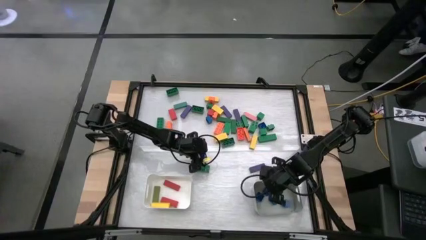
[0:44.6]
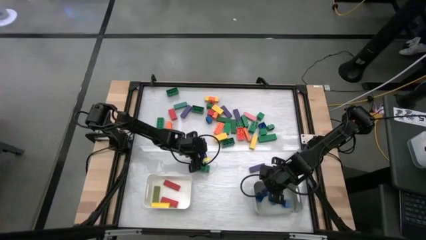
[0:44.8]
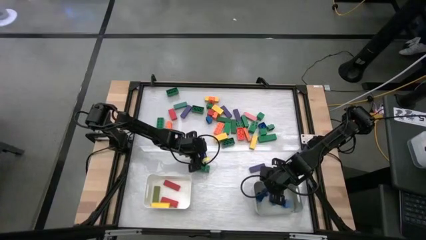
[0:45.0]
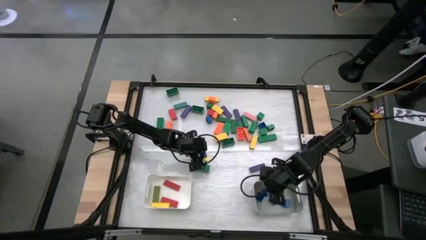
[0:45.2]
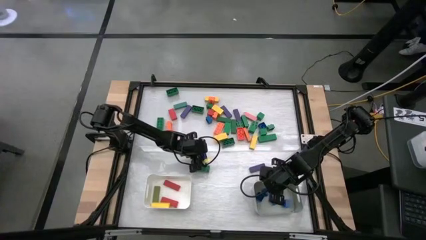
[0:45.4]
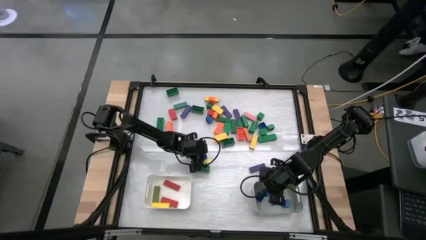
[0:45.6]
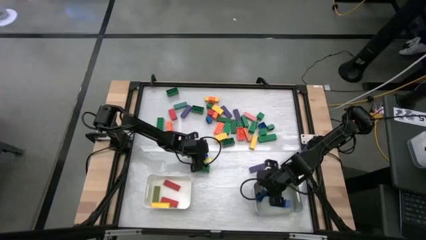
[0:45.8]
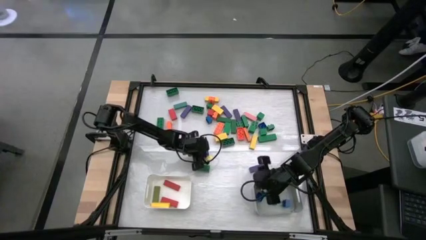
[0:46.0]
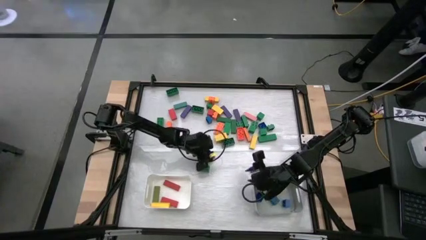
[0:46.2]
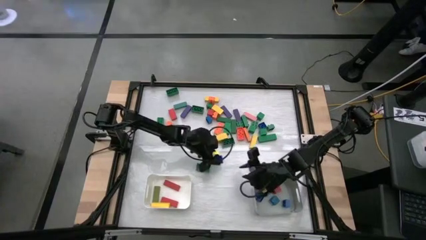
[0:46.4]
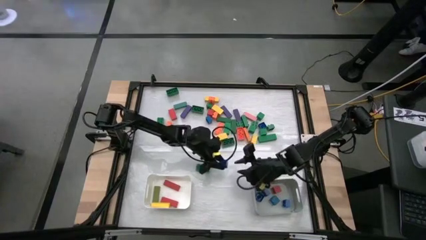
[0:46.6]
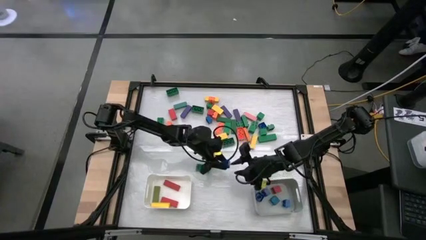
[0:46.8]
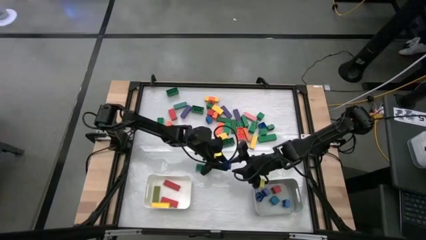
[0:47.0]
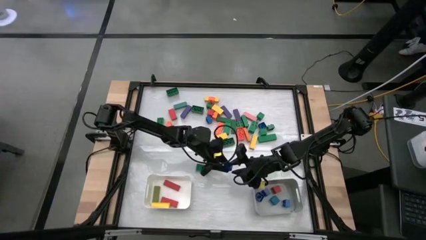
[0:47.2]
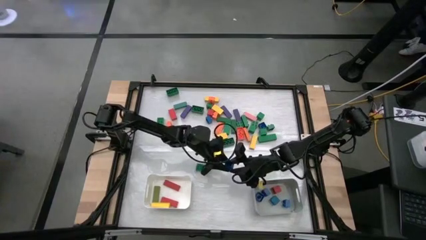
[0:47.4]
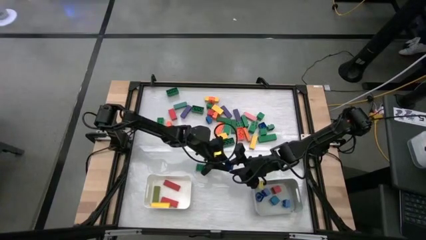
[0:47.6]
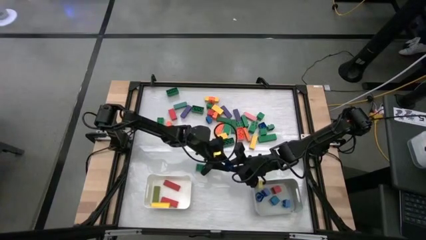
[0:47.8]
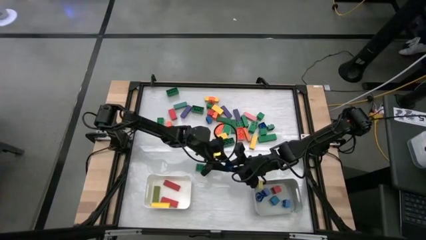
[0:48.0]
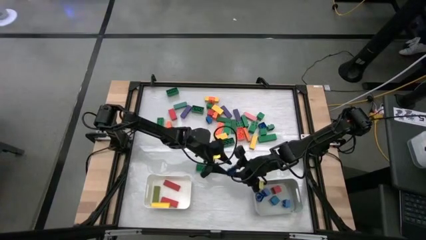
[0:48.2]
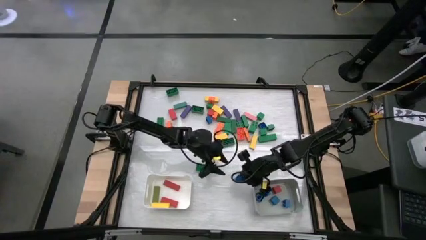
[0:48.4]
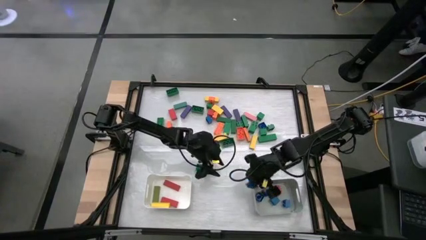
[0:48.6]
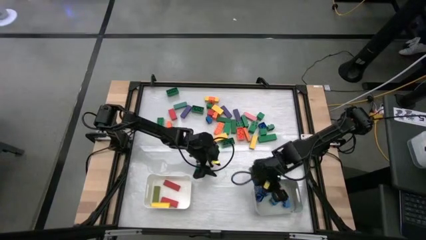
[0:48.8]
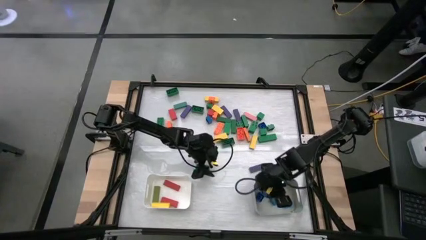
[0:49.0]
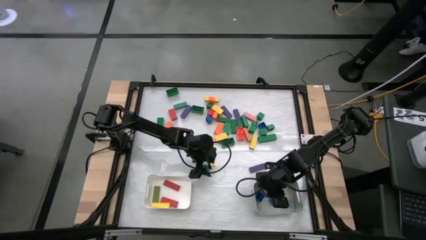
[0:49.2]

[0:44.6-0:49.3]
Task: Sort blocks by size
Put the square blue game piece into the gray bin

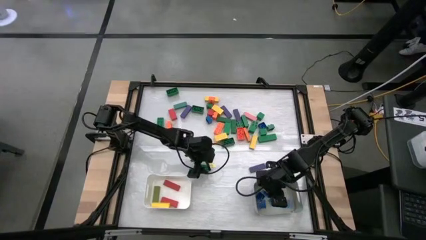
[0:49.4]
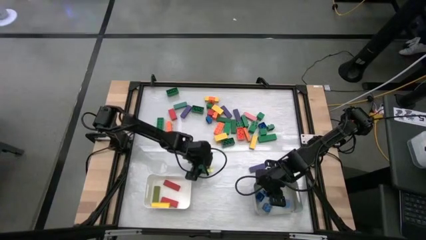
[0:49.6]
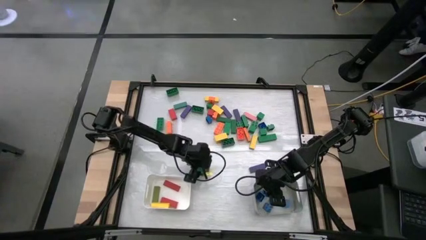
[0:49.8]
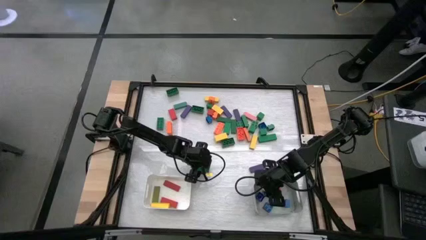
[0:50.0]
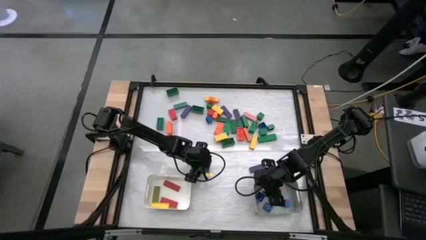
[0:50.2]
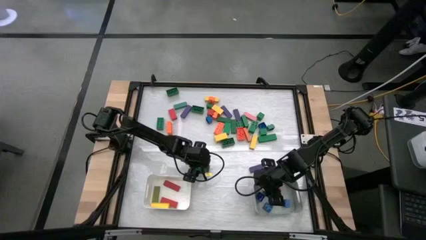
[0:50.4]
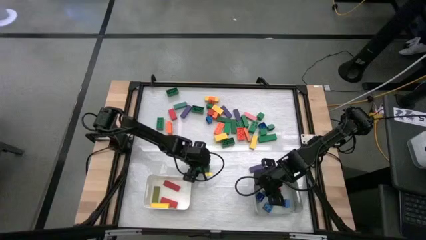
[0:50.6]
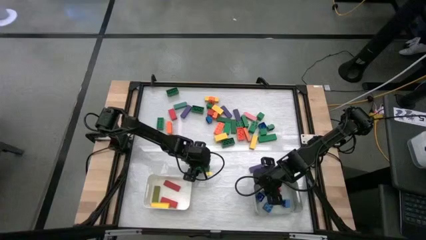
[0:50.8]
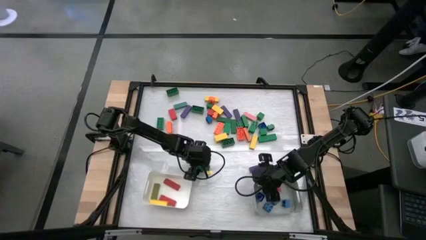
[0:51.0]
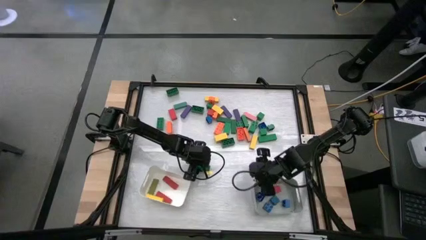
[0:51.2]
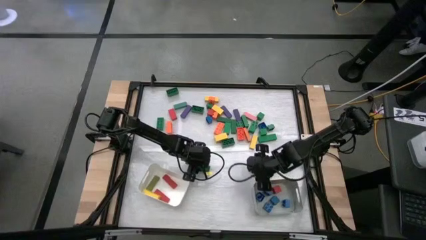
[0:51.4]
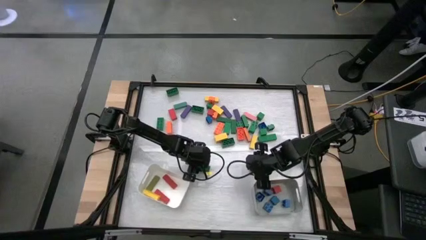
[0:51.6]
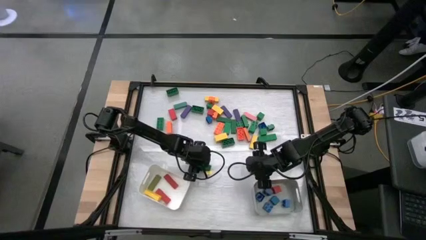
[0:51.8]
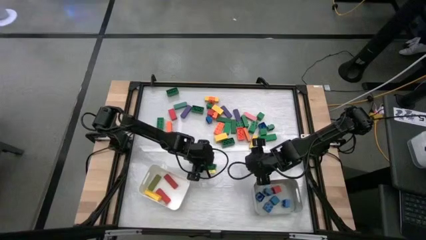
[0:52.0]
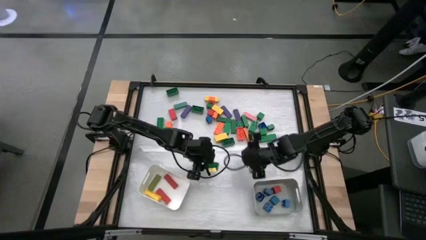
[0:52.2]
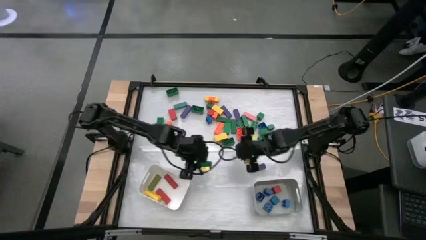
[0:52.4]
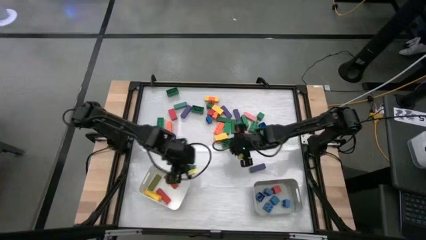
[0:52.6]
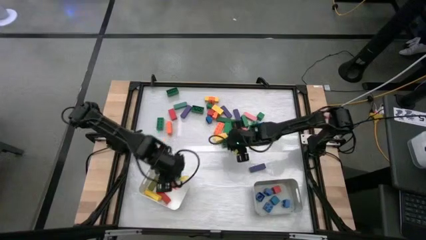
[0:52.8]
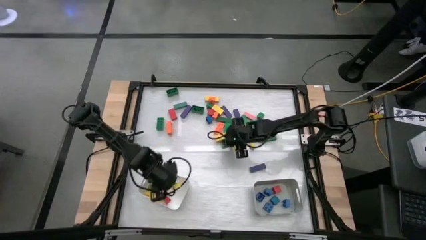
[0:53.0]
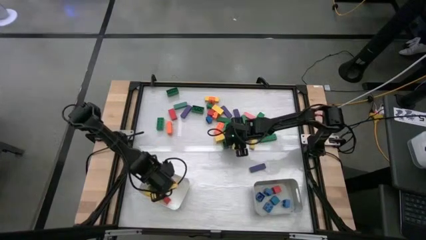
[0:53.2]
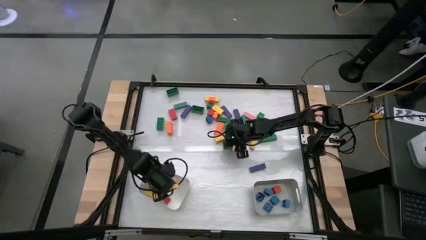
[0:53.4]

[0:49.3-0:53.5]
Put the rectangular green game piece into the white bin

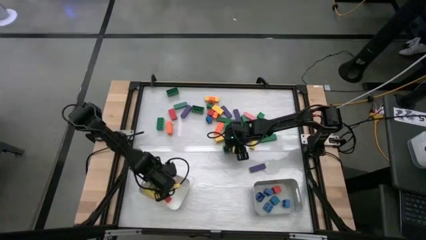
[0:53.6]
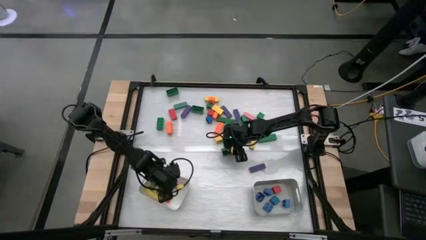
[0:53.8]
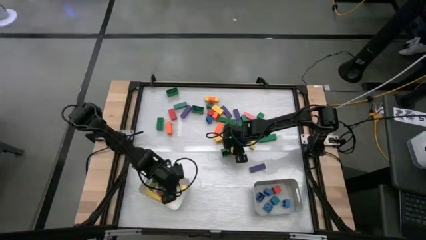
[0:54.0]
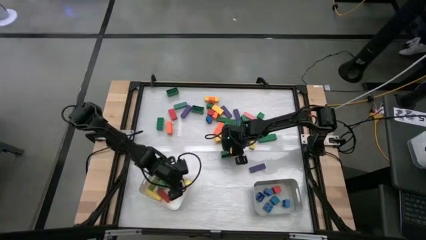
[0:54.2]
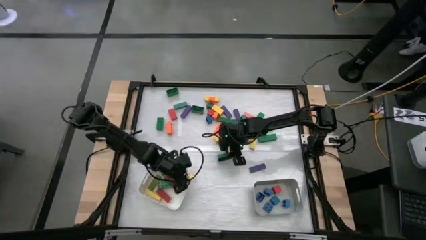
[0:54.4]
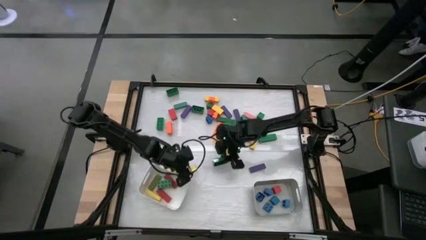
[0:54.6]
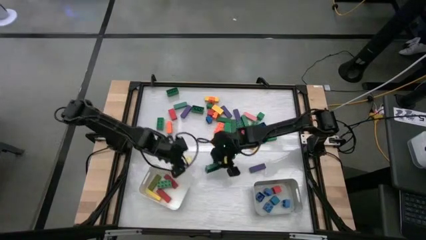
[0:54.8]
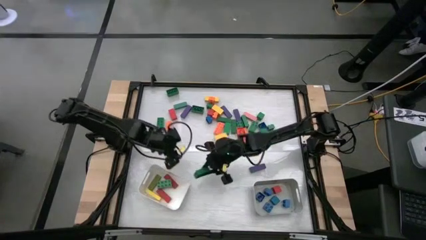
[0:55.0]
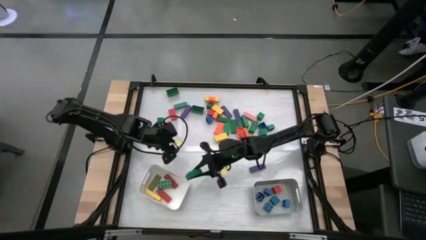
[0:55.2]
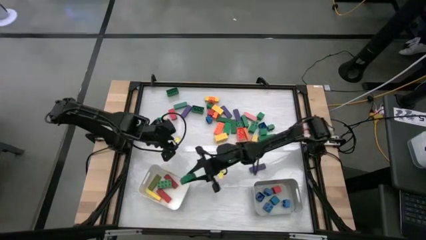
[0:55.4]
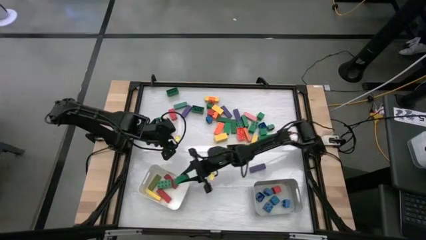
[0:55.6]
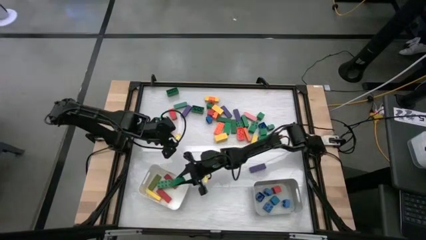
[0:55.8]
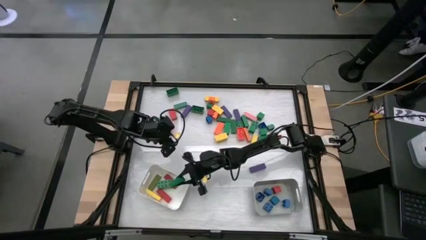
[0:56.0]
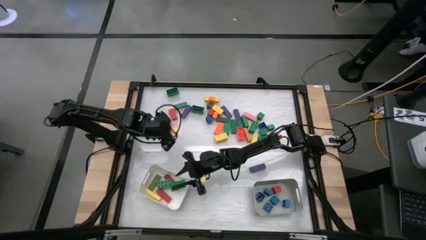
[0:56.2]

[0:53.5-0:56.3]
Put the rectangular green game piece into the white bin

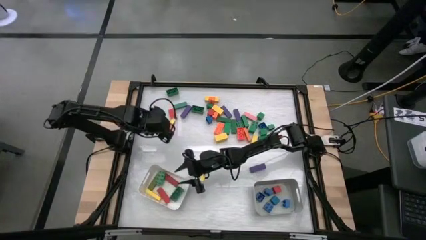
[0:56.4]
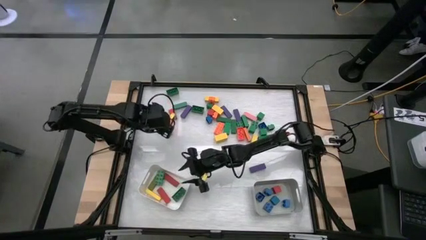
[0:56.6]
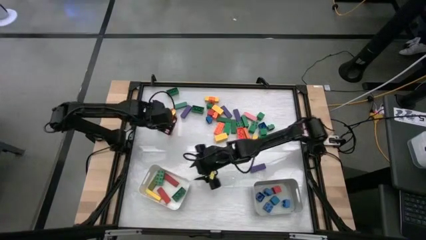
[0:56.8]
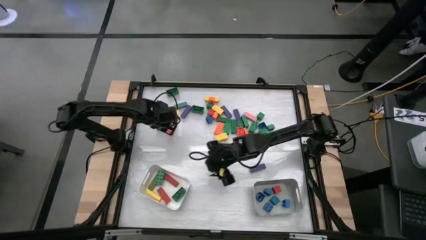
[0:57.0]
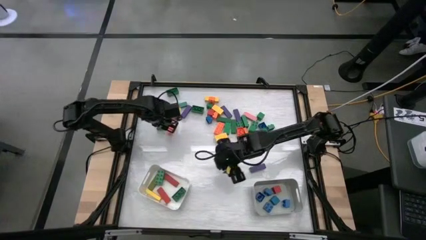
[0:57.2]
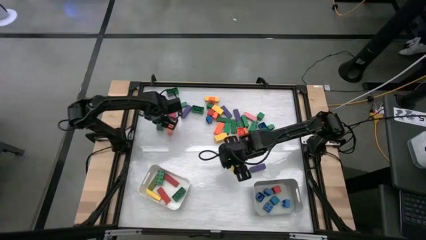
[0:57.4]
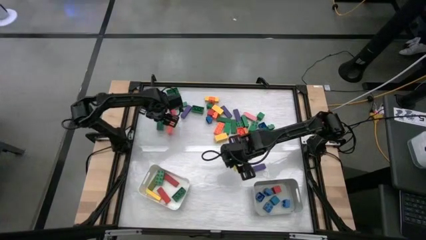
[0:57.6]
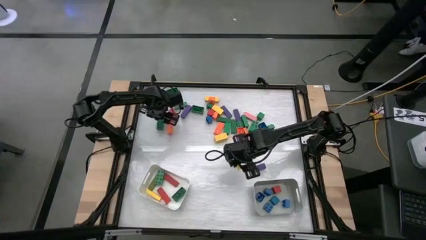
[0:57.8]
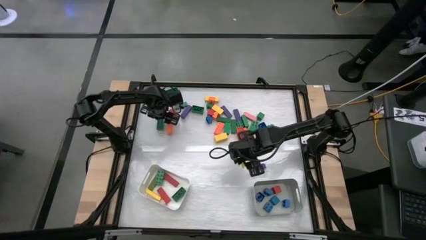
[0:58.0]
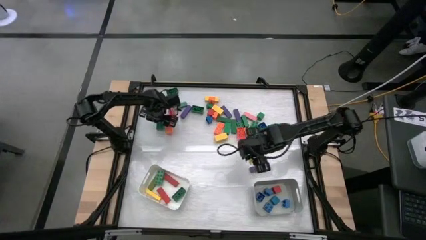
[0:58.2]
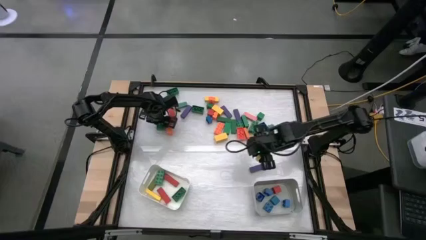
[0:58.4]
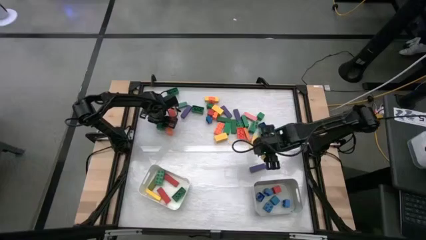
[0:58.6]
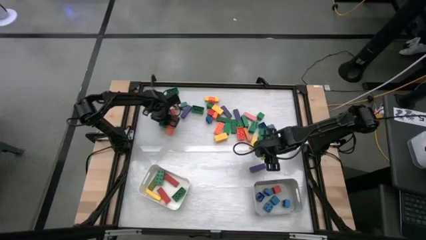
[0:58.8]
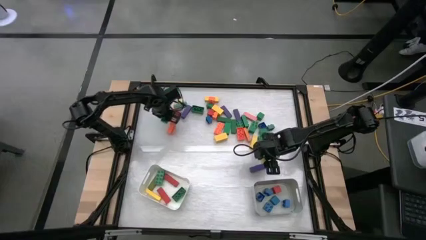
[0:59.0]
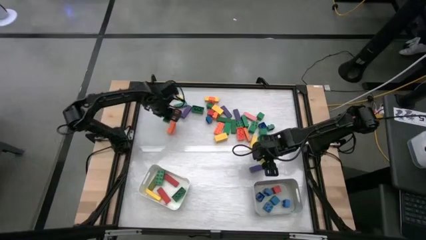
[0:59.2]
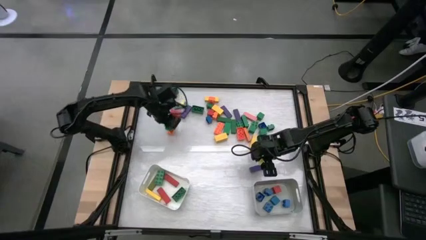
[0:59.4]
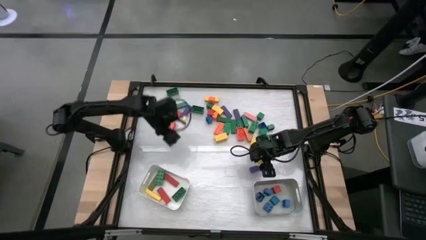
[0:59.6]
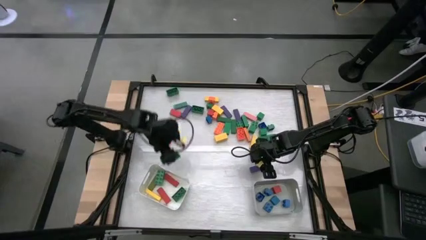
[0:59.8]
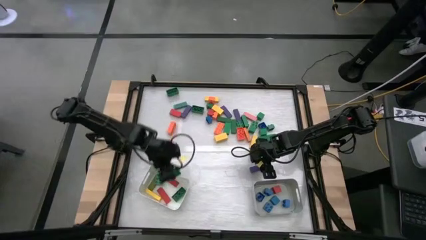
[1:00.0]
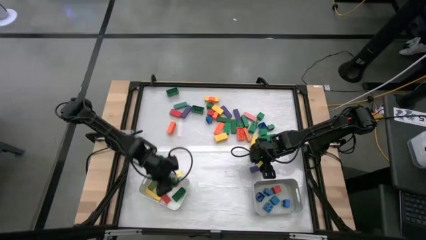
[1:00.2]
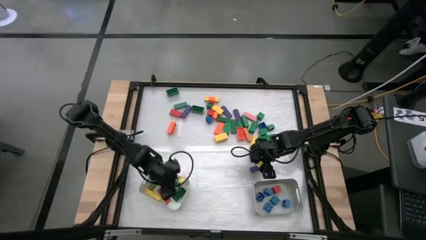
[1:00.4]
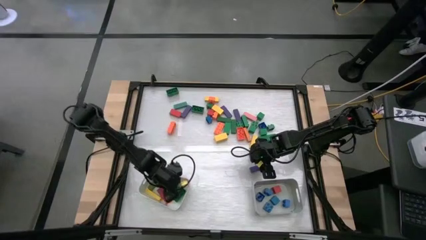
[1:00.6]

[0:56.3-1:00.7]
Put the rectangular green game piece into the white bin

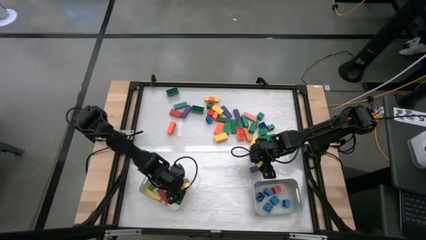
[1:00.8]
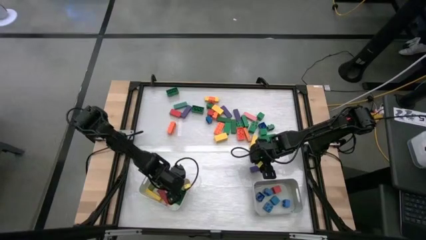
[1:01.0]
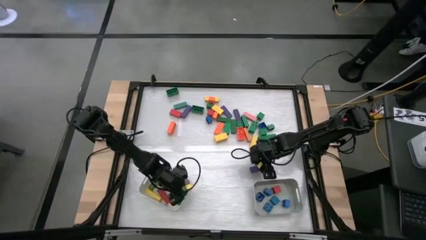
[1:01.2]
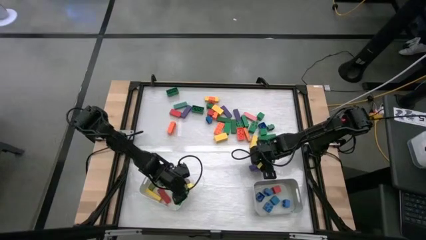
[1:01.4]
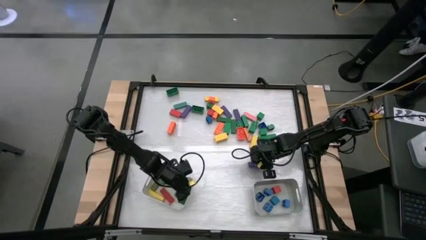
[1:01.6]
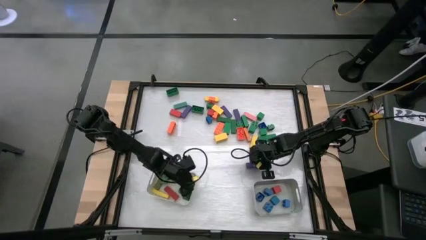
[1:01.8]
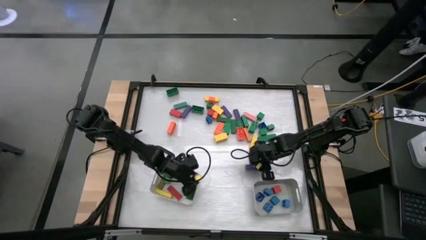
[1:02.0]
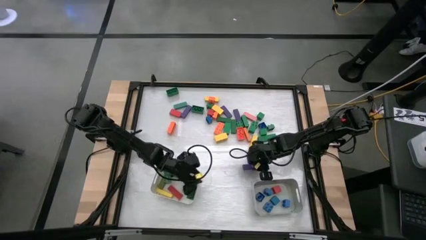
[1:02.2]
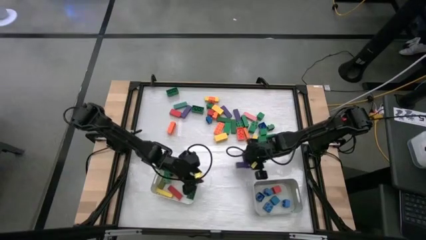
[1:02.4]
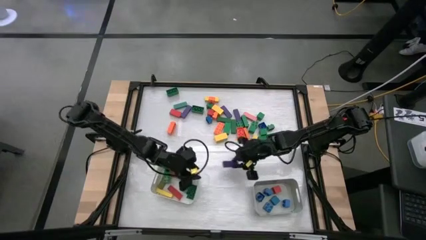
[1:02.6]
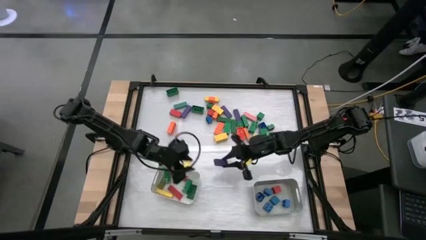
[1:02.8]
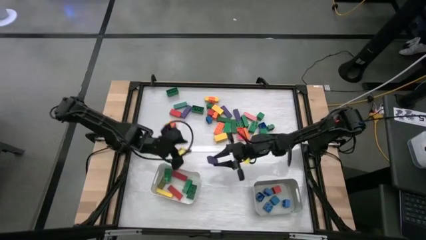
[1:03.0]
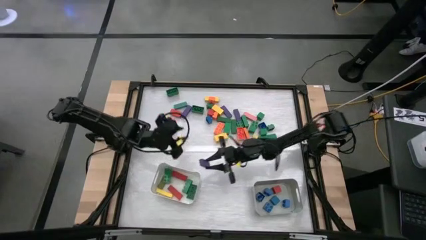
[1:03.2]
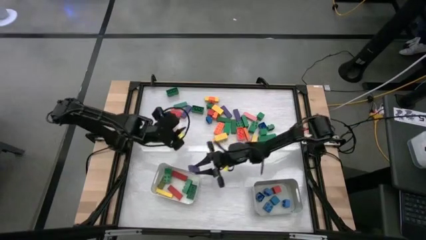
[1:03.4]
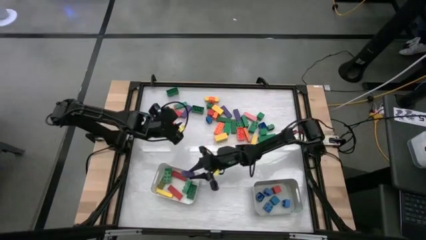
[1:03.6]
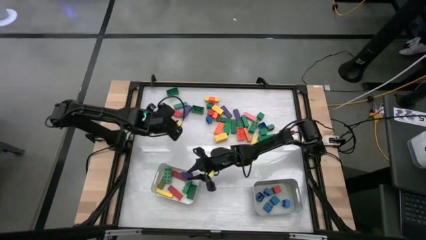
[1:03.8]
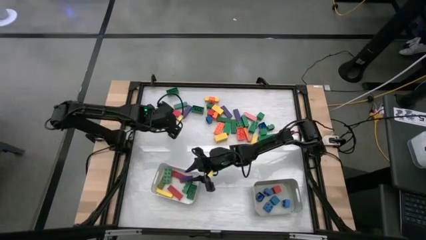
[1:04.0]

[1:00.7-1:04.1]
Put the rectangular violet block into the white bin
